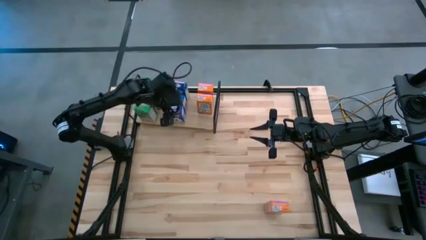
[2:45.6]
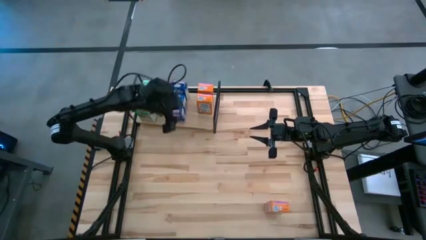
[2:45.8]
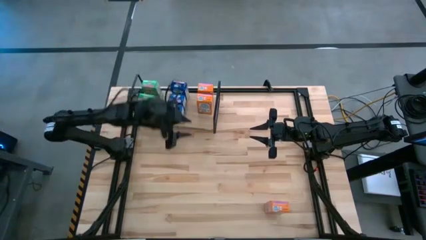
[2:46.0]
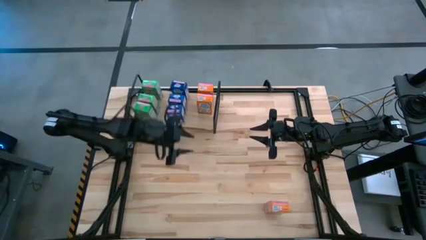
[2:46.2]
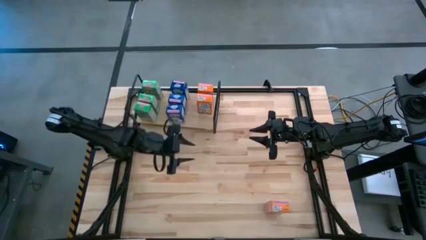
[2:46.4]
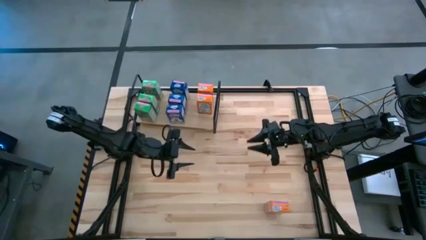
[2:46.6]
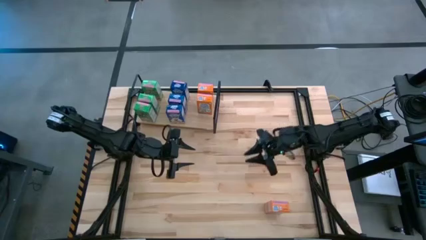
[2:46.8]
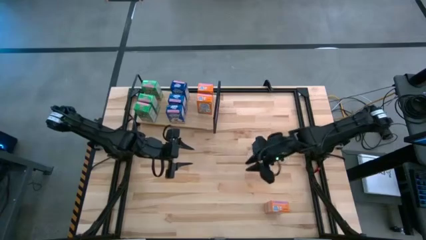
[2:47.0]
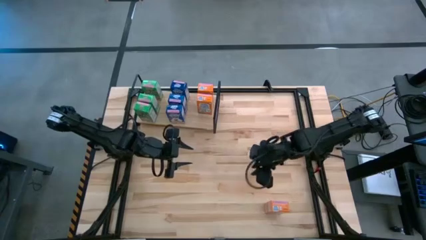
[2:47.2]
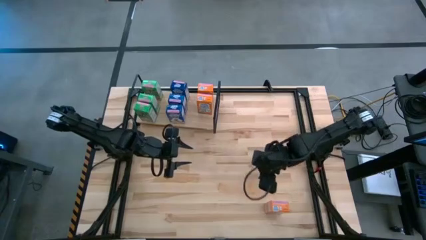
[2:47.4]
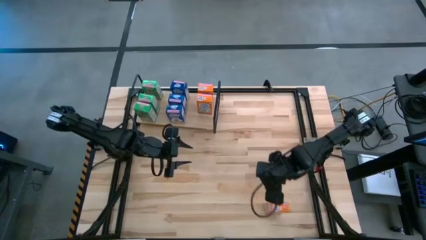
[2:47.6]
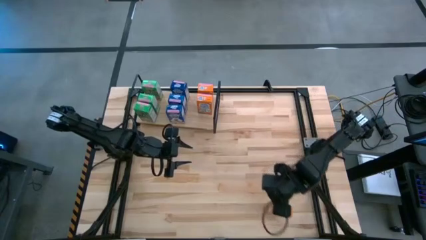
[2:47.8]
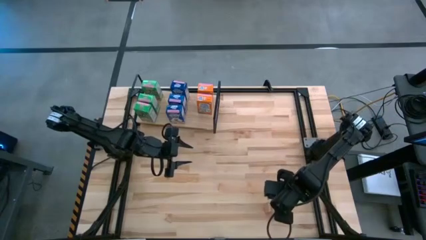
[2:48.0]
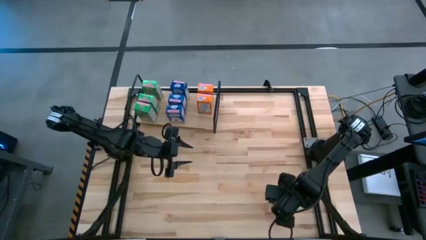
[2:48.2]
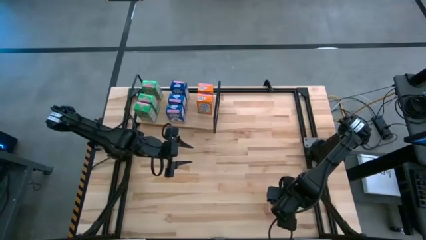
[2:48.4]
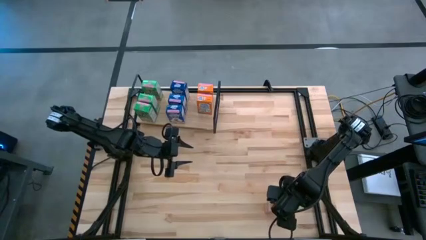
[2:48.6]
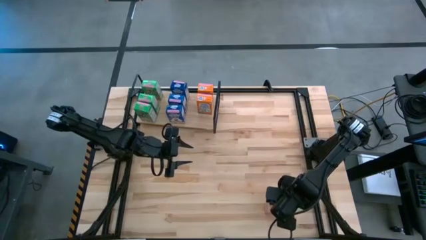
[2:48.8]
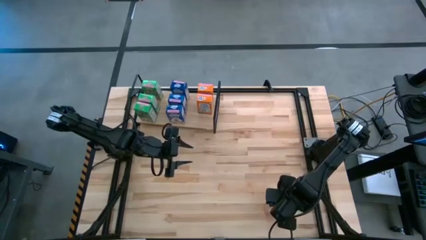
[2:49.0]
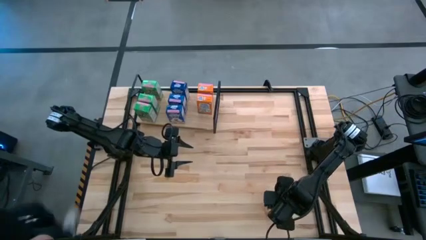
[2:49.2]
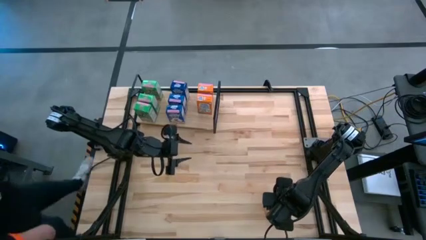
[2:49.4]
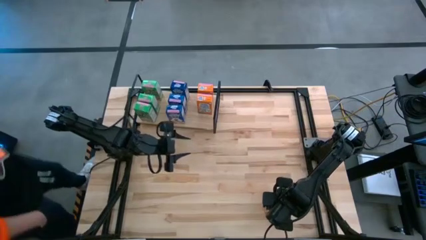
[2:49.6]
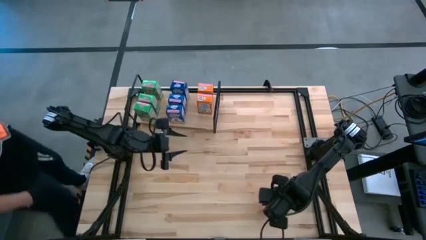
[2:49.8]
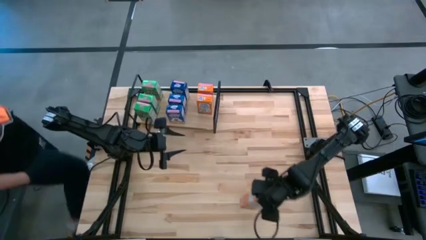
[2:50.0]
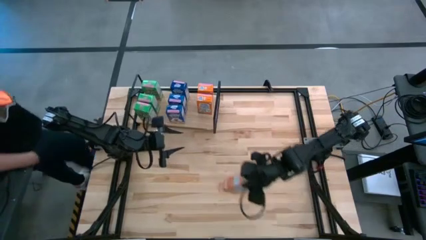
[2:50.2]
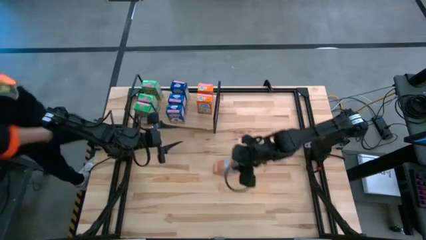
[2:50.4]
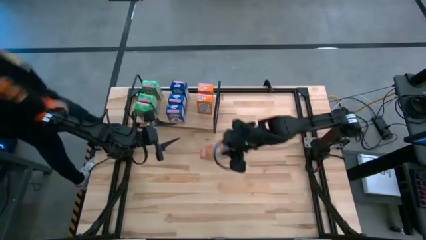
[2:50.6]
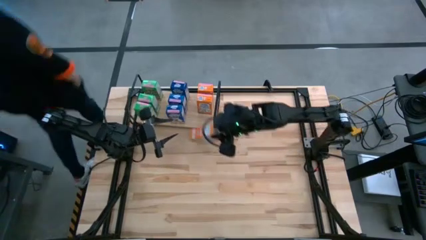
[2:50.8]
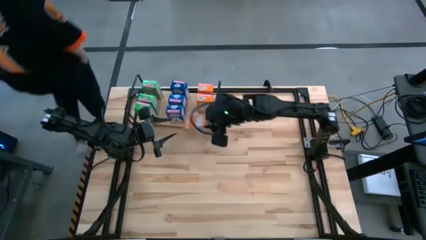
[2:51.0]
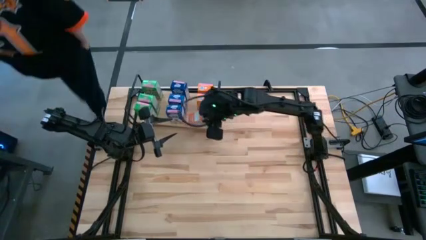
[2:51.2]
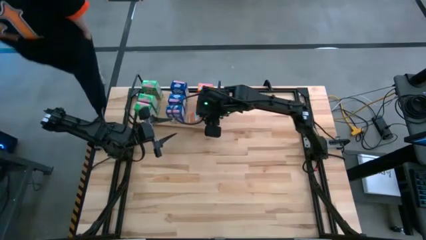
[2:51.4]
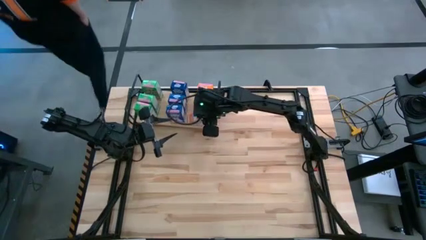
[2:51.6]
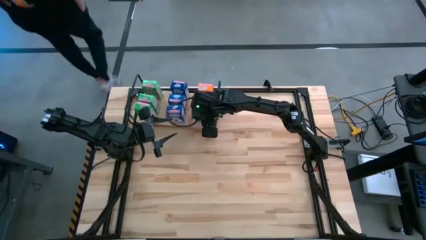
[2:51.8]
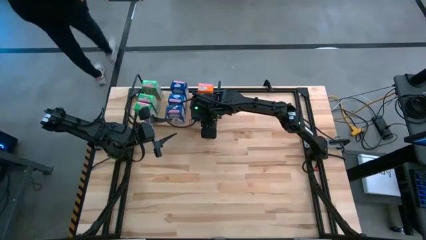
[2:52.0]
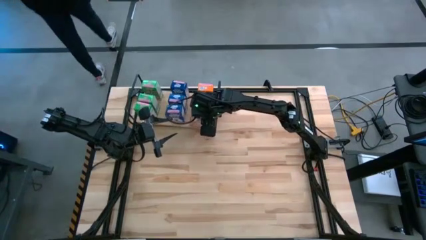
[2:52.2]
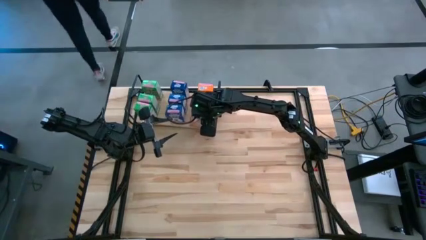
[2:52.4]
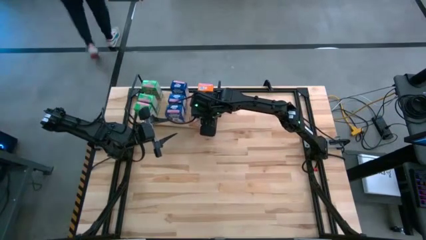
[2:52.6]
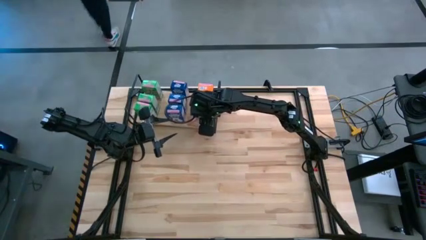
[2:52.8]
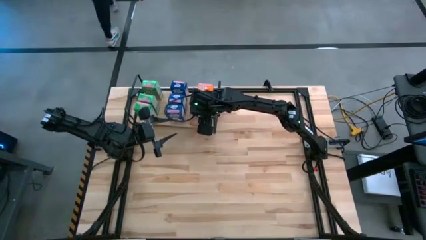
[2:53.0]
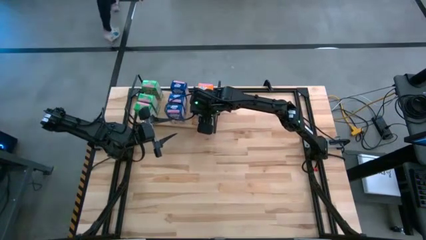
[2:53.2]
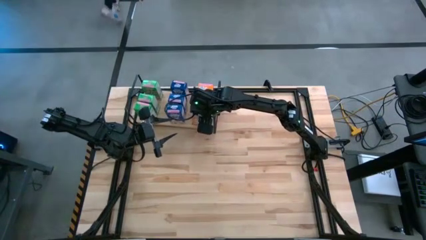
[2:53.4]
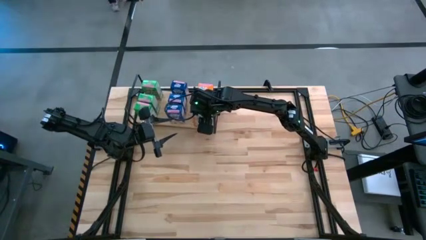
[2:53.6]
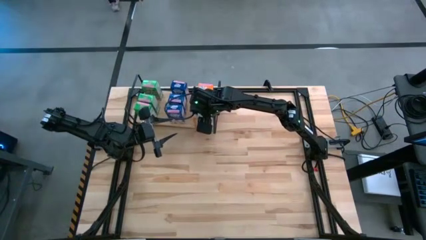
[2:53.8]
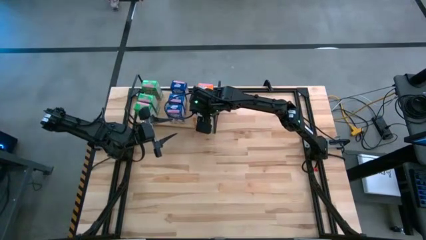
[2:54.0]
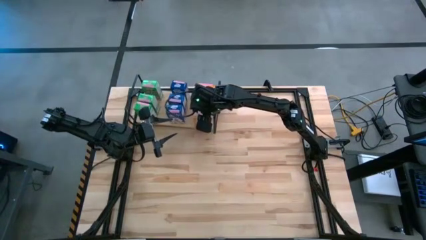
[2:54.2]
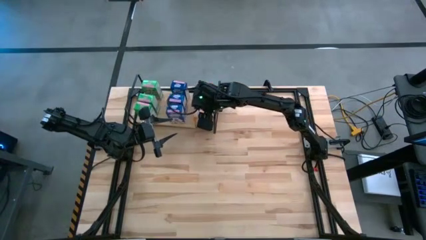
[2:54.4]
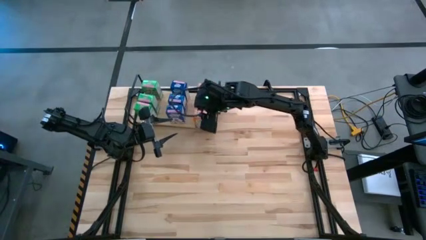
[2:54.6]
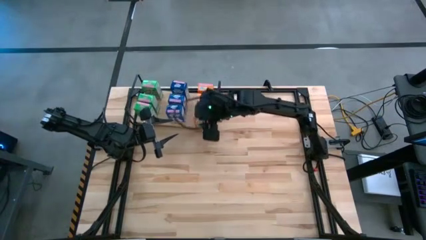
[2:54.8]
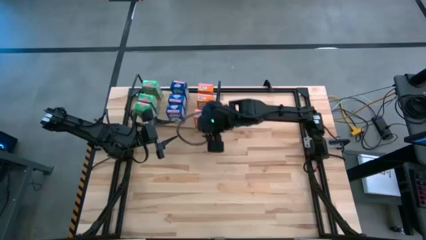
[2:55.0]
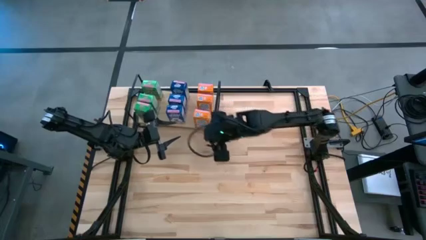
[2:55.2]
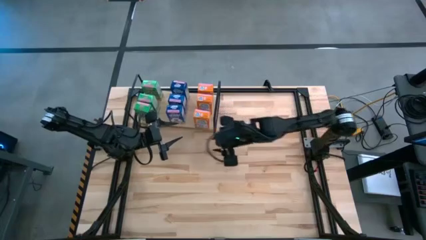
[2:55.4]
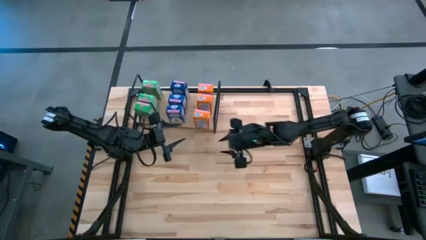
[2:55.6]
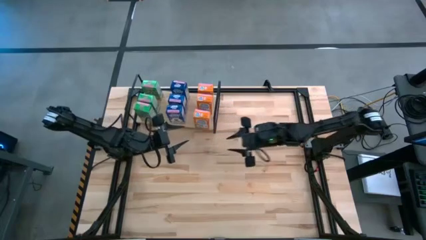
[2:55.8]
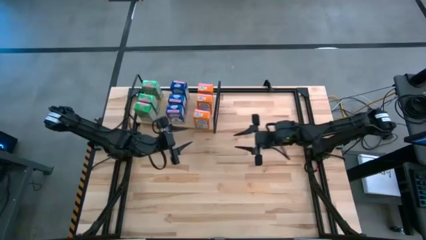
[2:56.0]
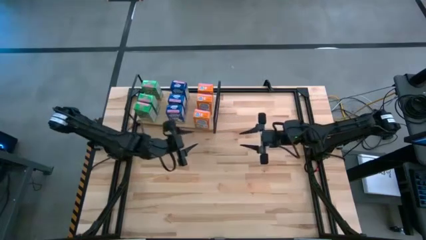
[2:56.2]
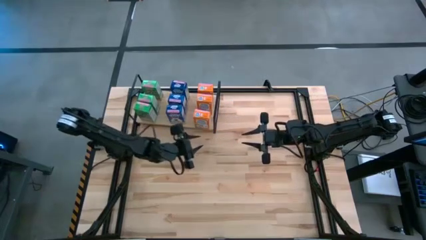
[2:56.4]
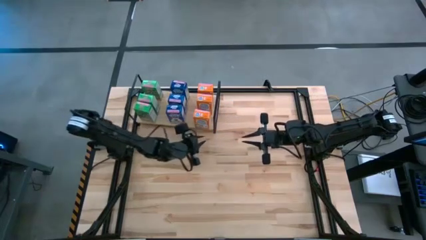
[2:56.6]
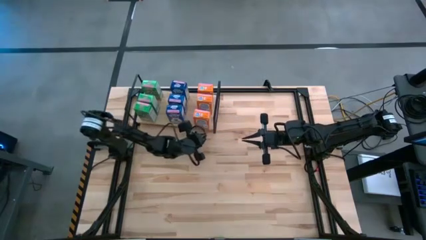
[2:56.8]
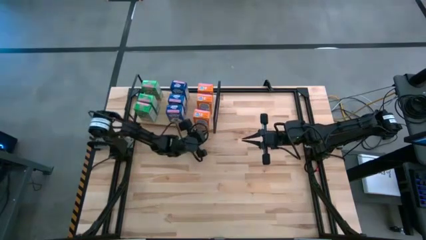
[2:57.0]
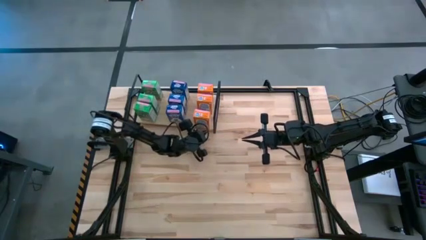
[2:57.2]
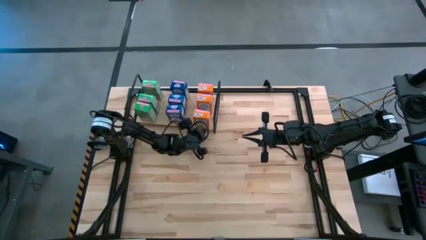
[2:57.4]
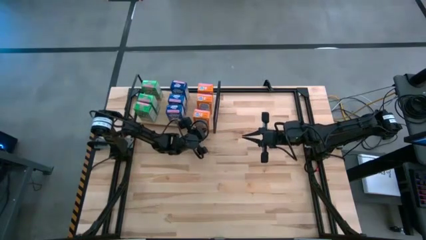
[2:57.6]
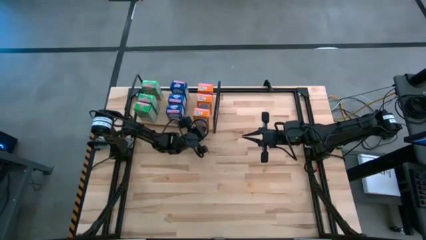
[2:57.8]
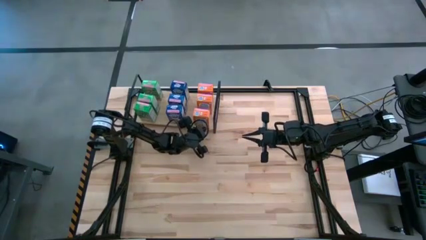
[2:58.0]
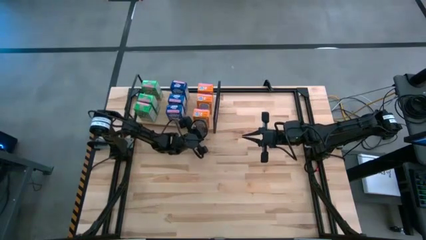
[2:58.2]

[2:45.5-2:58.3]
Task: Stack cereal on shelf
Put the orange cereal box on the shelf aligned with the orange cereal boxes

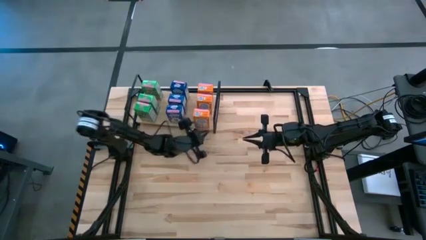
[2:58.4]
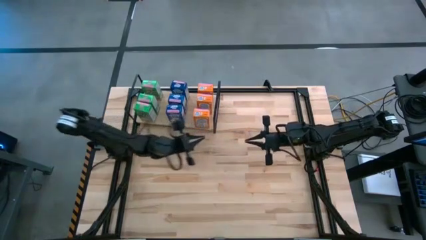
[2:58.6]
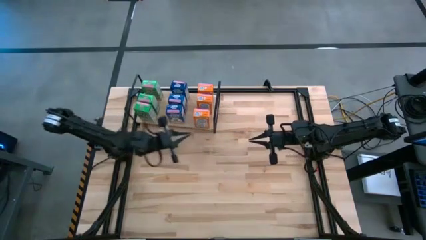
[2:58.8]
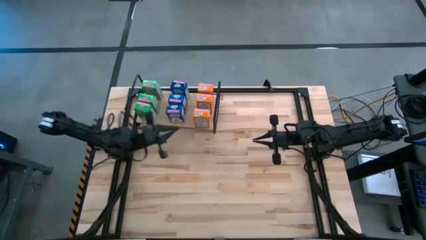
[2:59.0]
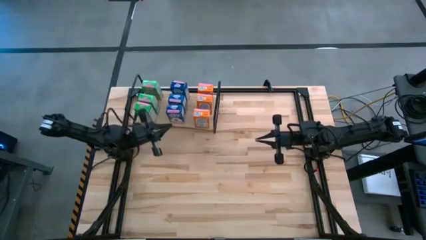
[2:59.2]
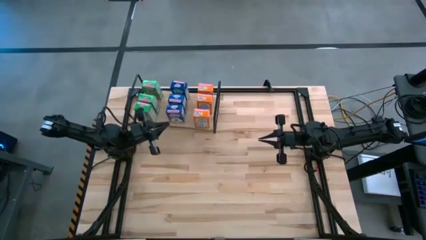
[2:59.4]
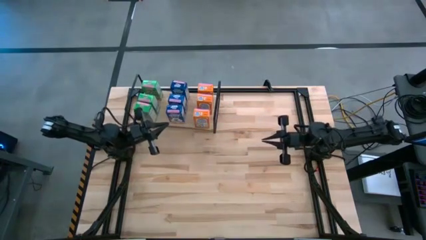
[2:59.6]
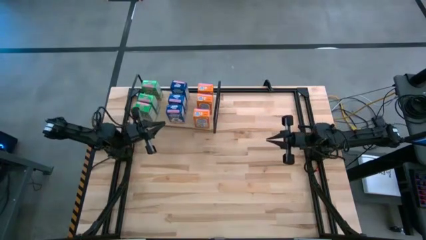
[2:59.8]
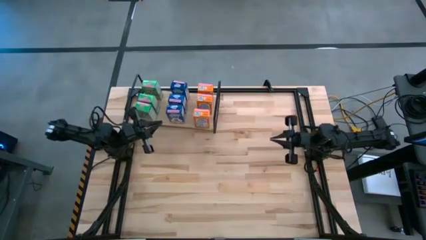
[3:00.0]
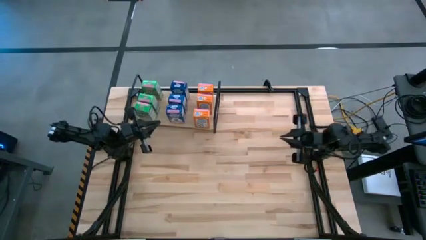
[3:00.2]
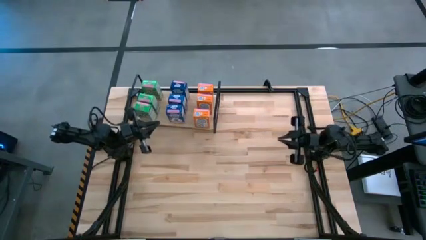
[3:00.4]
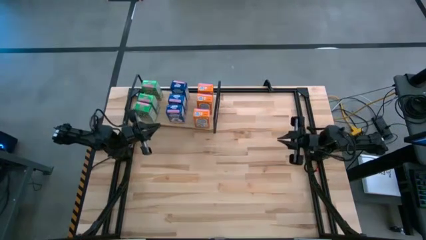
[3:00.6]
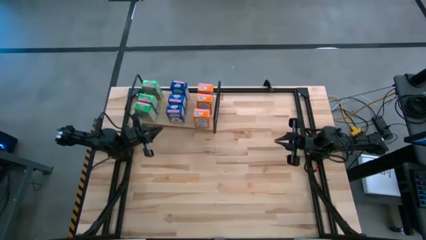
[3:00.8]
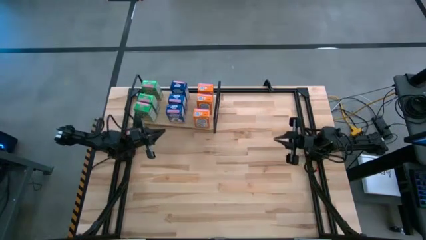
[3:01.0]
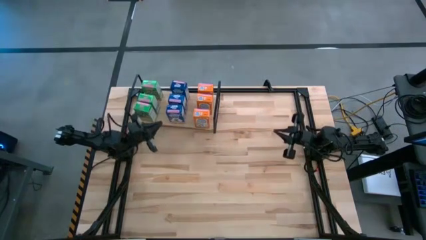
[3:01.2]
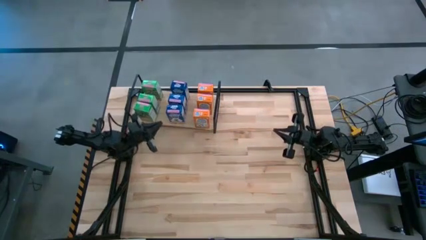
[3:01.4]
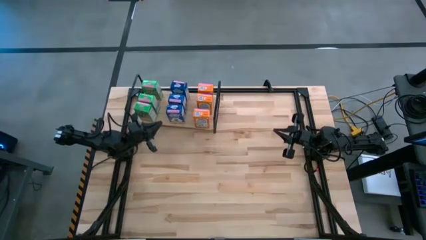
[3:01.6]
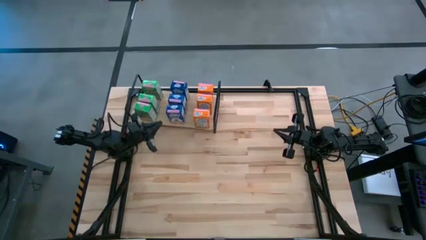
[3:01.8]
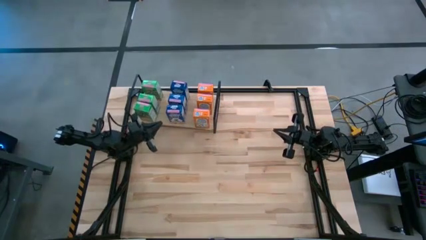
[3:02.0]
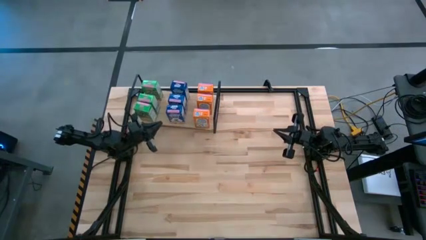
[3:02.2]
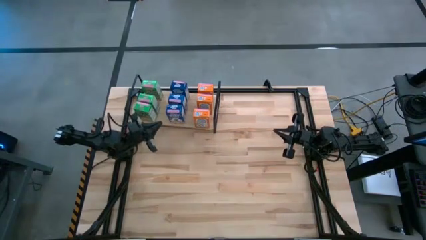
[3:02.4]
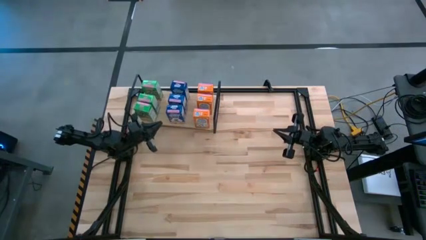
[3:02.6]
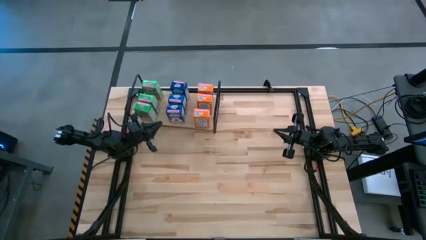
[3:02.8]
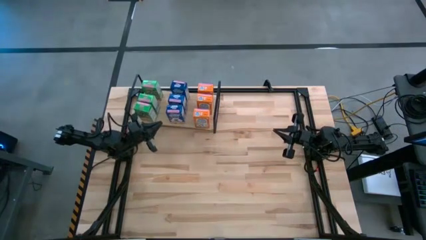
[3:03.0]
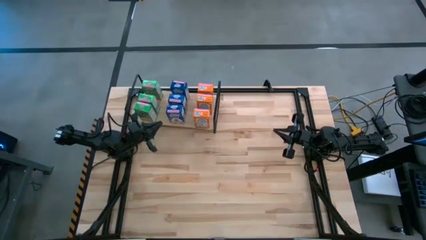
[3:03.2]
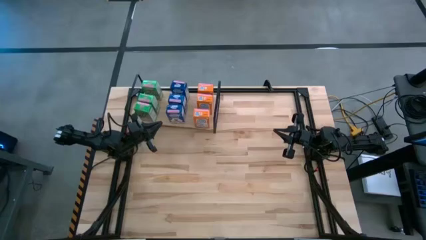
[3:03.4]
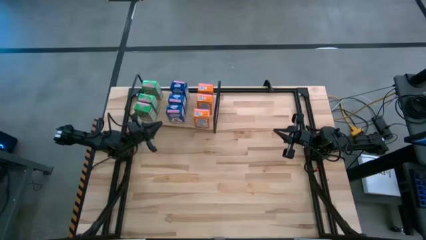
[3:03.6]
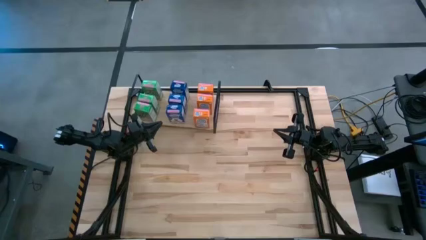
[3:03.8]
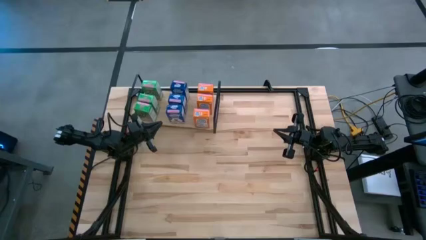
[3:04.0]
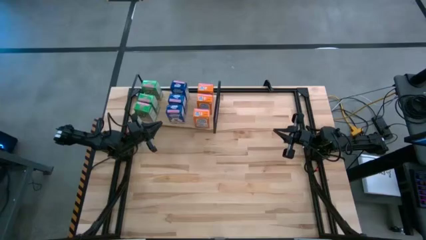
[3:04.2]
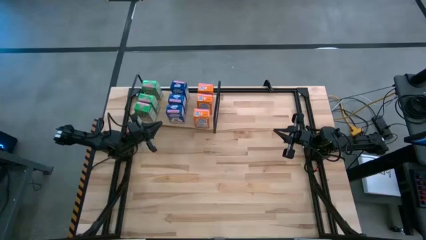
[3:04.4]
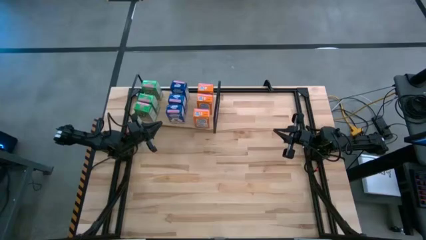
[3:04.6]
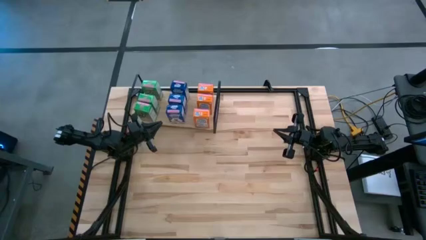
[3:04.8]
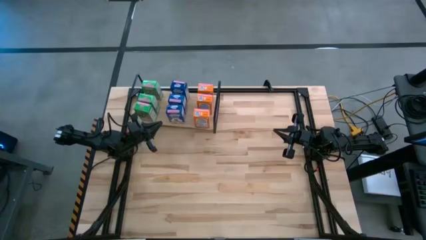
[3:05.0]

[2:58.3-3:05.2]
Return to Home Position
